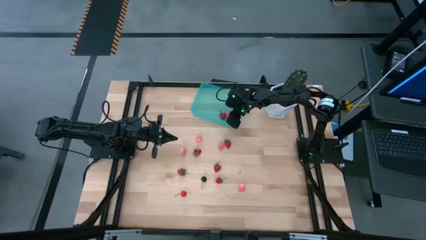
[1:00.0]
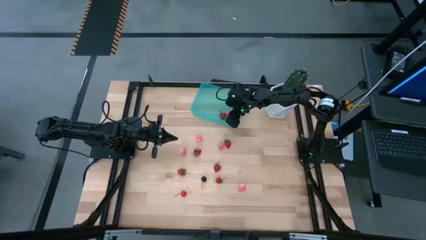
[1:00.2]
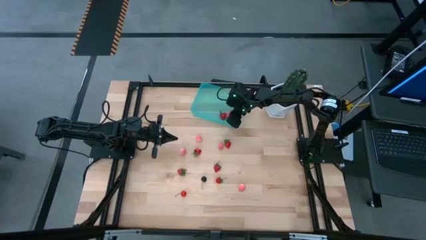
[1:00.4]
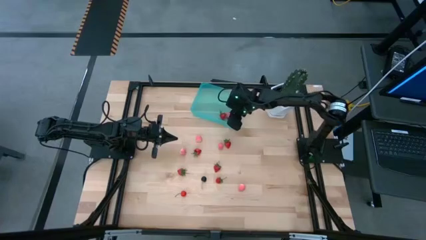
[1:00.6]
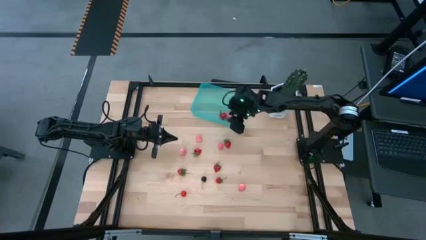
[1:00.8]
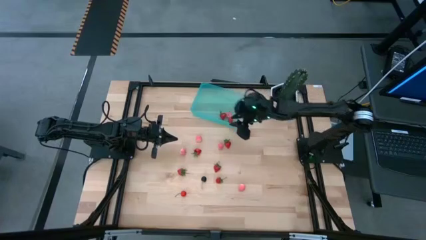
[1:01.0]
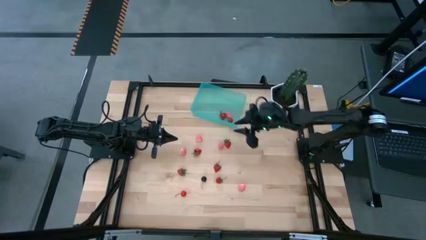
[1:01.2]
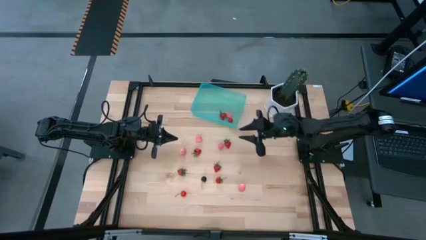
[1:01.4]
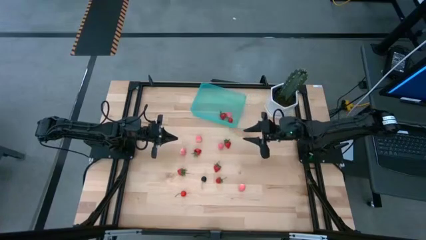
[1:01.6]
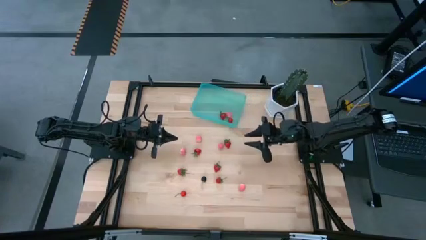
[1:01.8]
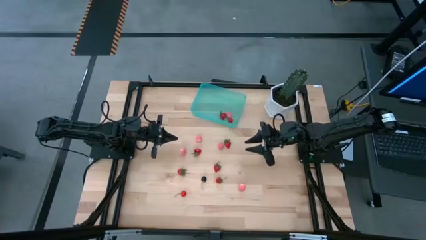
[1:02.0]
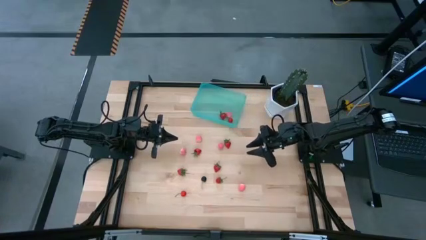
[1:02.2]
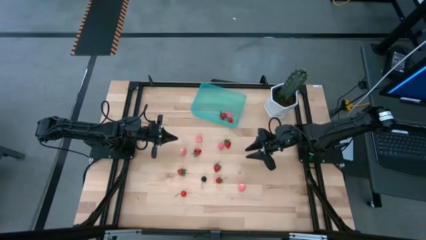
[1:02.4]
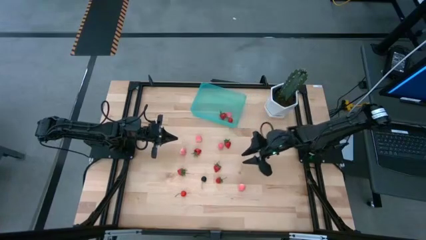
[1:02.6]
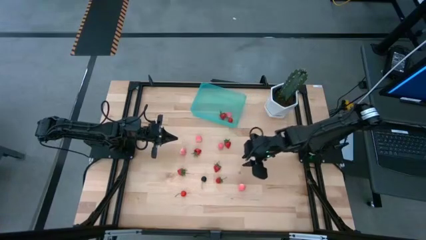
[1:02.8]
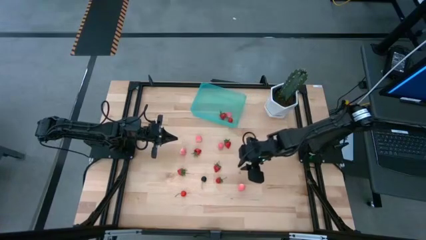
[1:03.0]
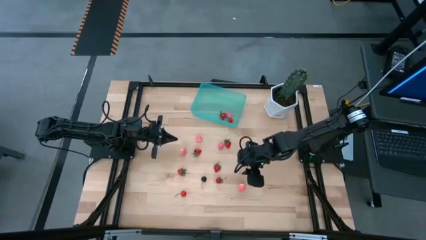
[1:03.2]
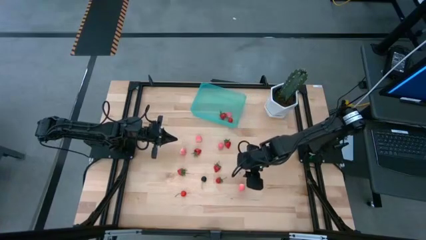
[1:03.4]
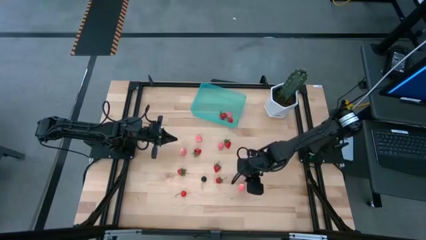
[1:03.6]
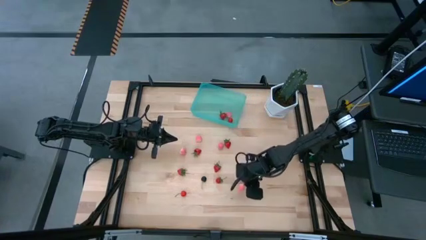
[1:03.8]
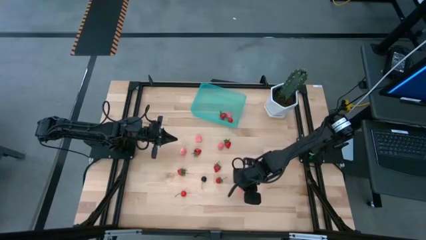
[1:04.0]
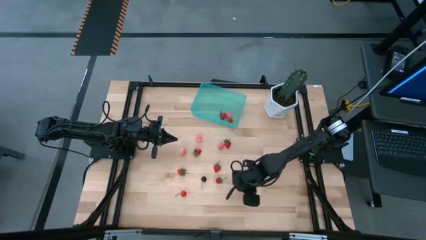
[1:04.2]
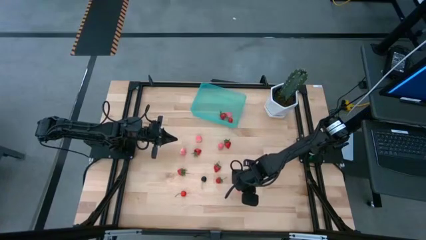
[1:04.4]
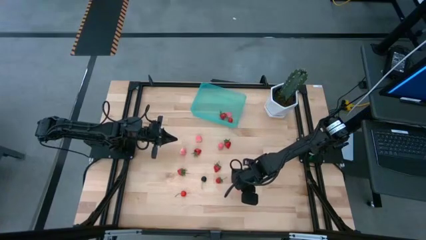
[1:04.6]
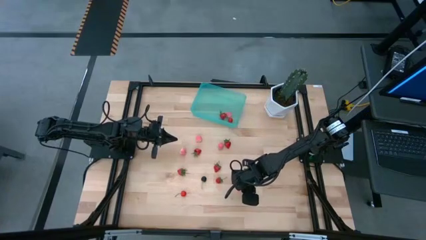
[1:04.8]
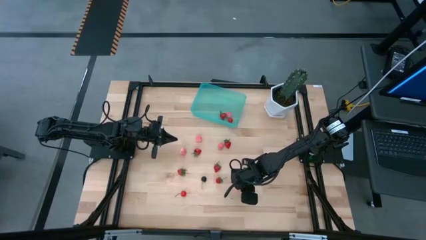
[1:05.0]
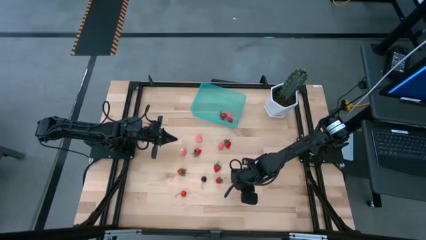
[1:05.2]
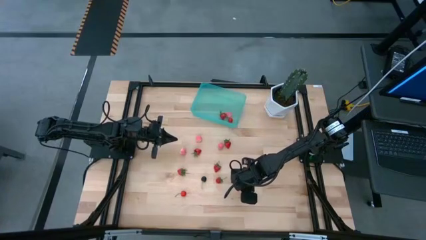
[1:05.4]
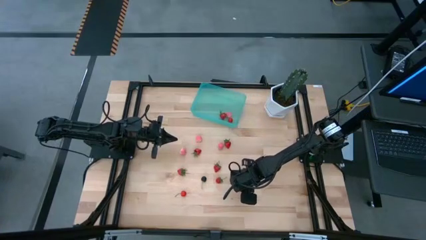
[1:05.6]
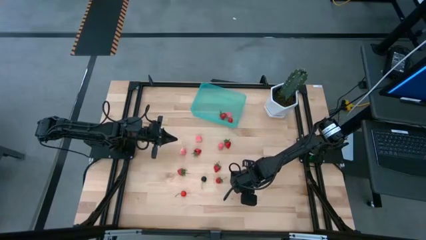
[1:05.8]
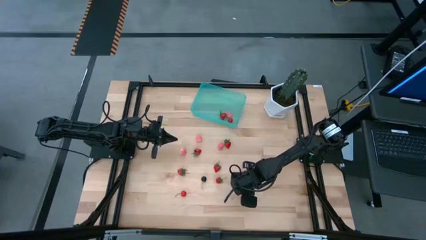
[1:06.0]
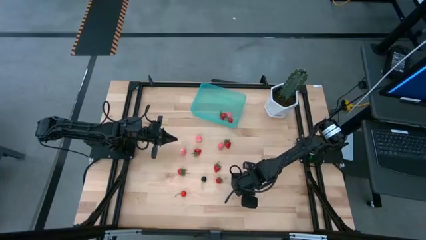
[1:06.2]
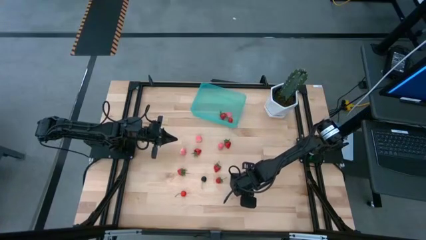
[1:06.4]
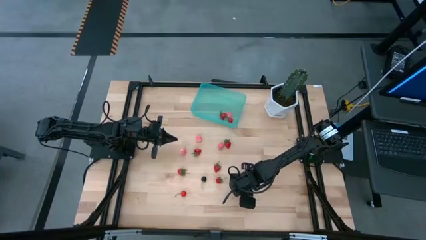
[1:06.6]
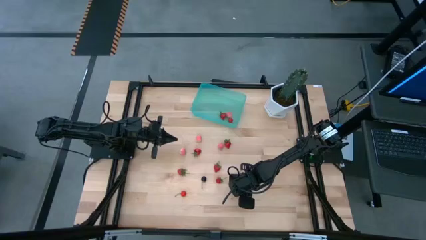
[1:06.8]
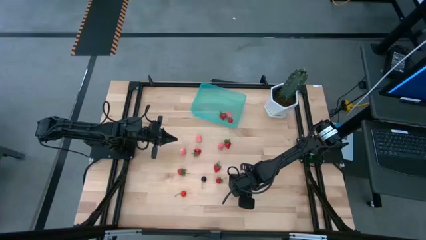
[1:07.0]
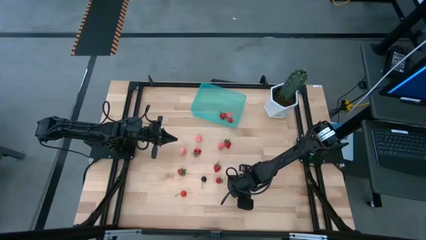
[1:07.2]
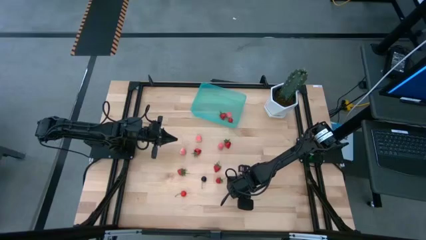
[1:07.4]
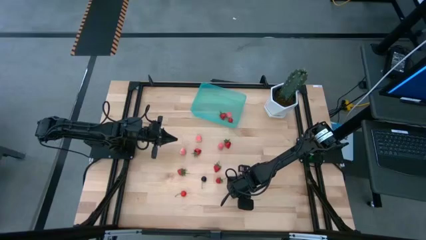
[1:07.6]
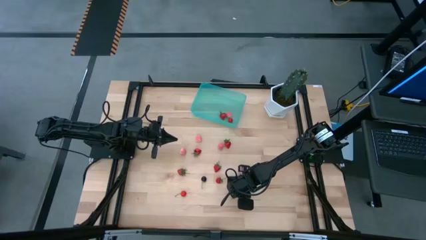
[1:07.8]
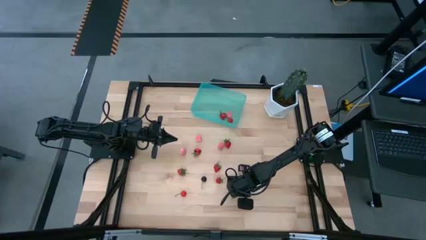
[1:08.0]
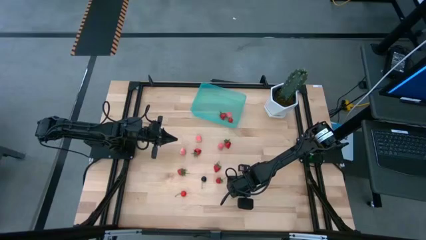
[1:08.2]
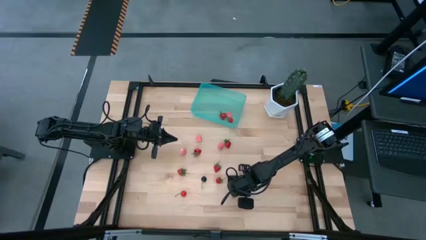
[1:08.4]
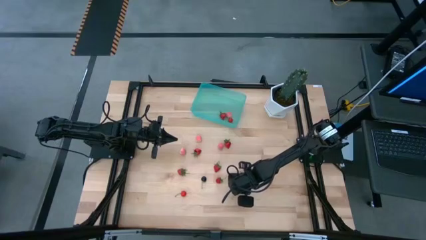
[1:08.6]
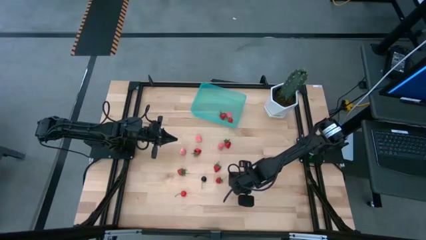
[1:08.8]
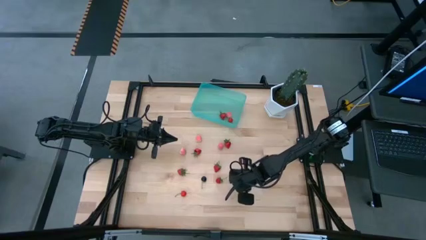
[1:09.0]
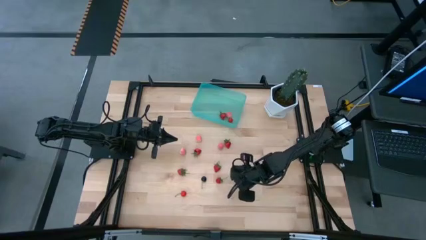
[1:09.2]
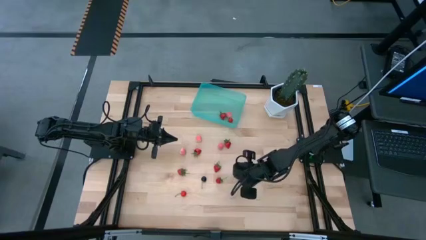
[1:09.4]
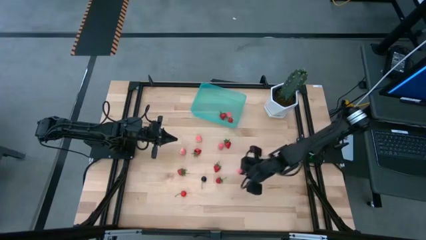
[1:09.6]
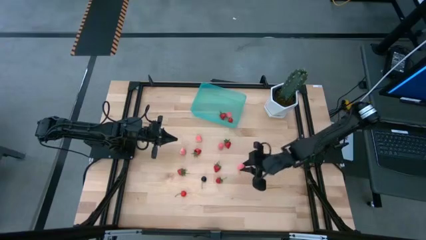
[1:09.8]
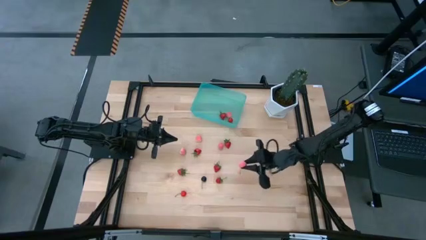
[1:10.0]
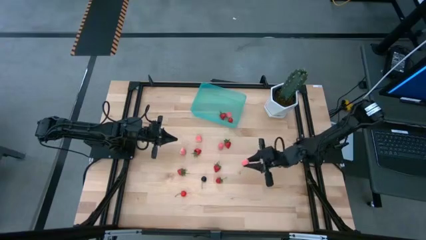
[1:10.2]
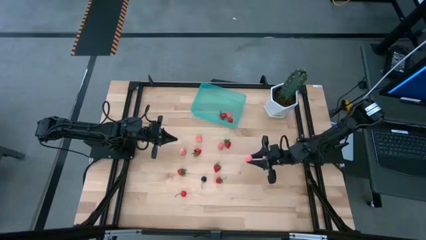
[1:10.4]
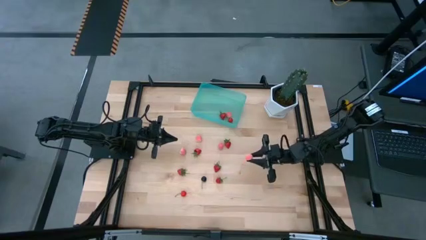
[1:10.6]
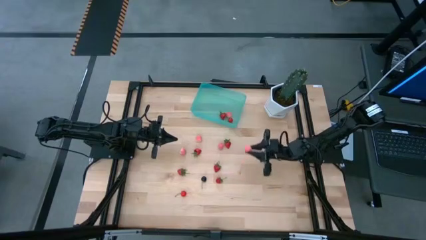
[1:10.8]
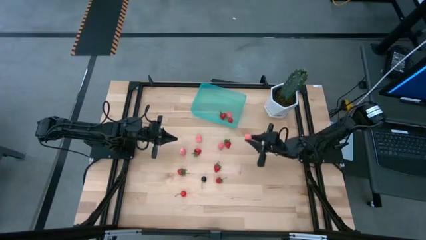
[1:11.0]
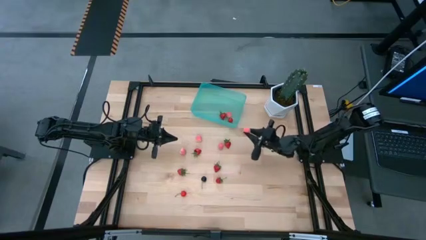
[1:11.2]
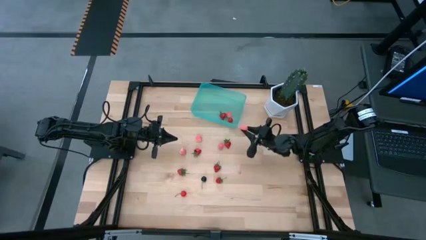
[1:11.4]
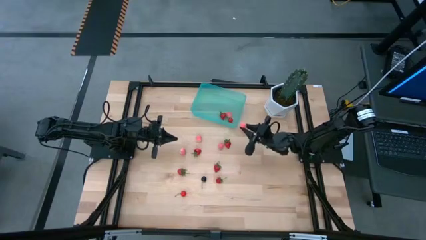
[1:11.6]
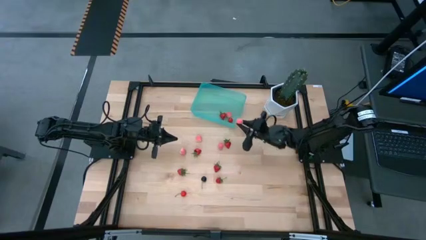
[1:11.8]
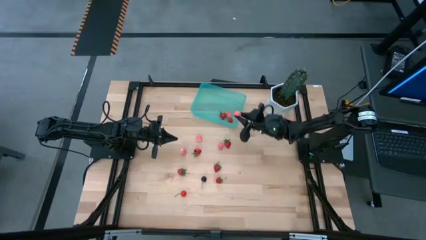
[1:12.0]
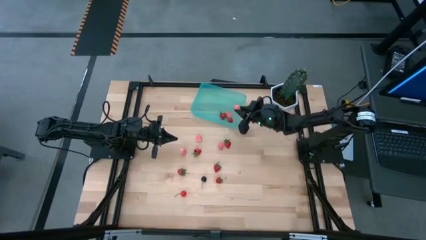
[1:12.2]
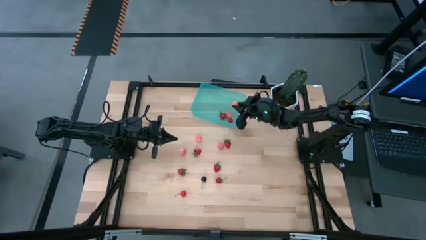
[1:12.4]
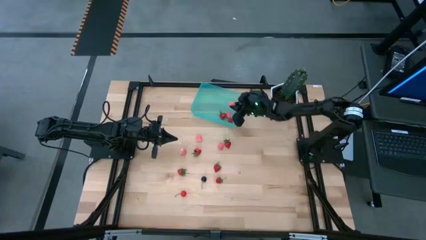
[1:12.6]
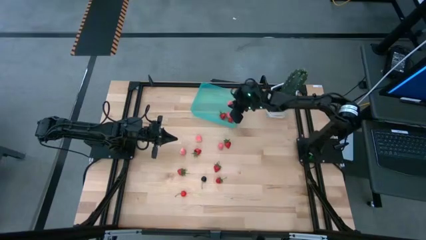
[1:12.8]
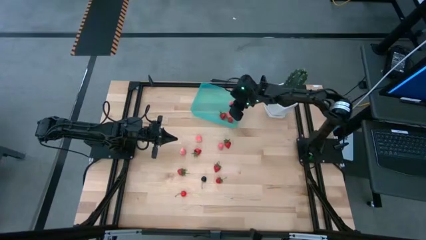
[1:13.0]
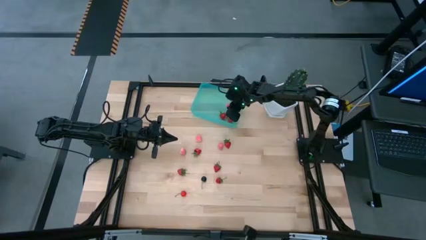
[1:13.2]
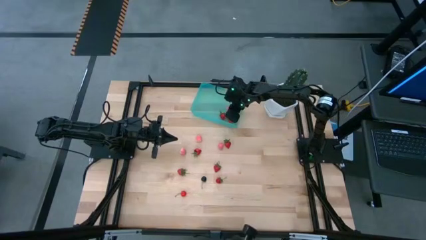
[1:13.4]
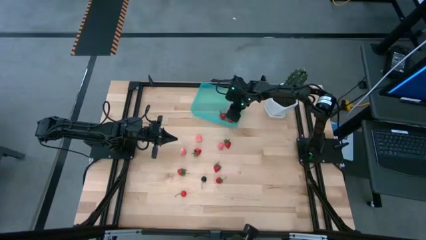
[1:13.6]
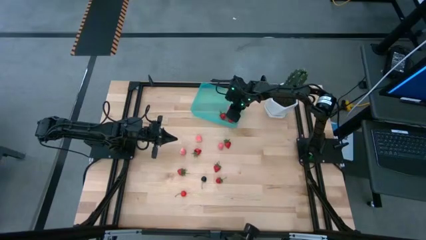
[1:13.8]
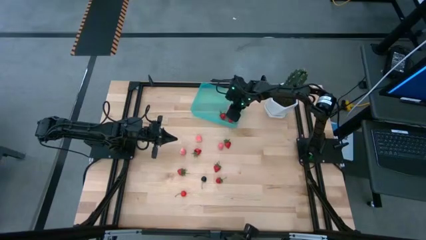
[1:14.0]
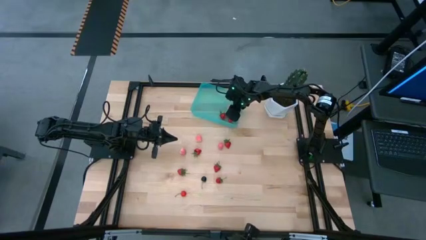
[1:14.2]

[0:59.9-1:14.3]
Task: Pick and placing Produce into tupperware
Put the pink peach into the light blue bin
